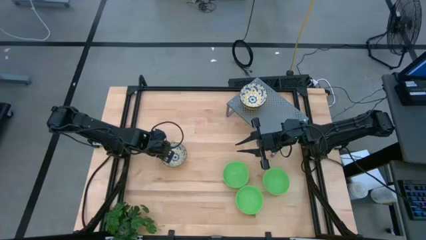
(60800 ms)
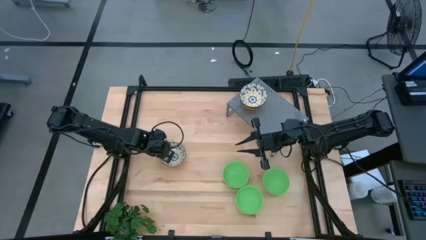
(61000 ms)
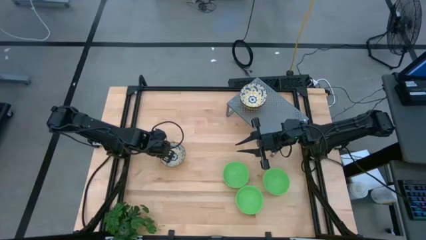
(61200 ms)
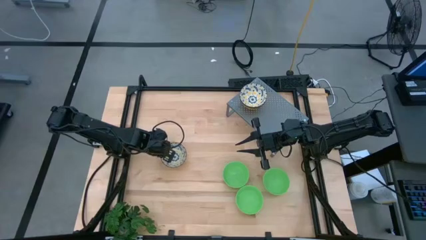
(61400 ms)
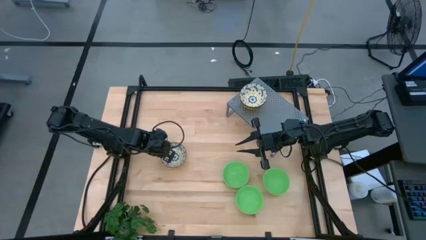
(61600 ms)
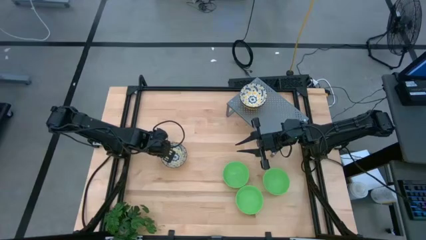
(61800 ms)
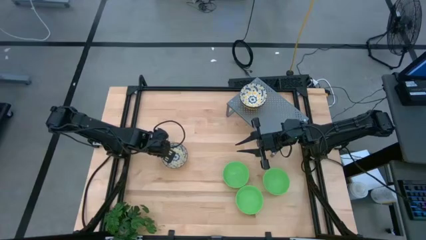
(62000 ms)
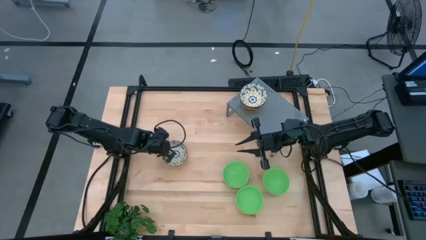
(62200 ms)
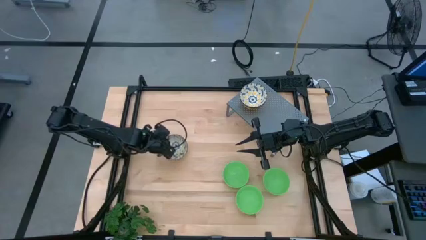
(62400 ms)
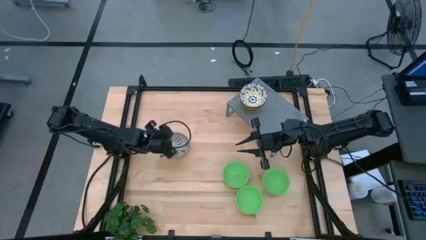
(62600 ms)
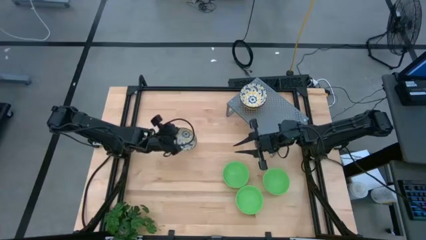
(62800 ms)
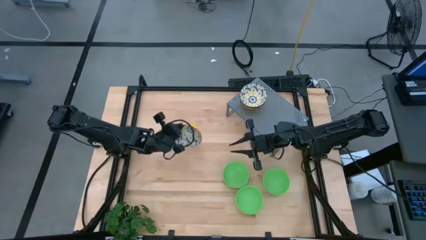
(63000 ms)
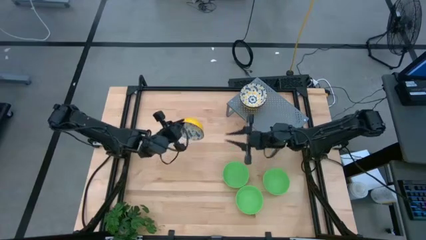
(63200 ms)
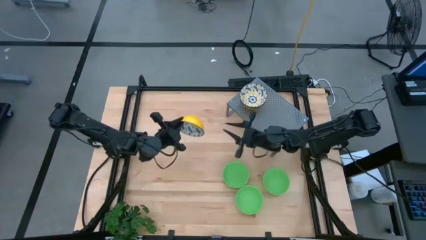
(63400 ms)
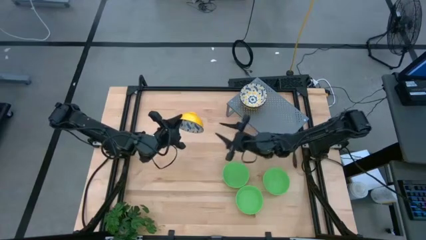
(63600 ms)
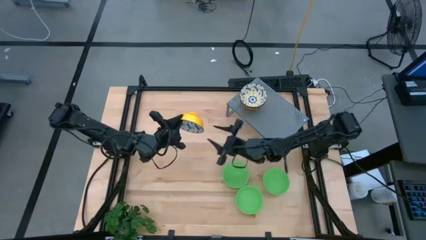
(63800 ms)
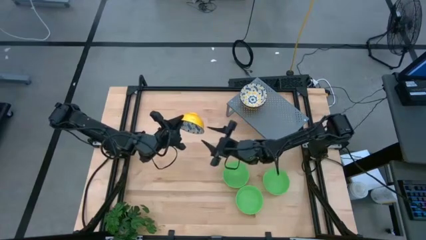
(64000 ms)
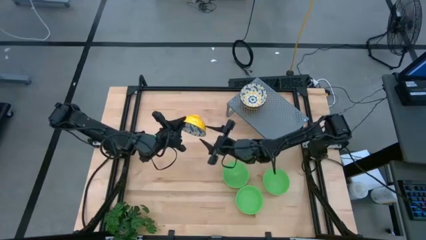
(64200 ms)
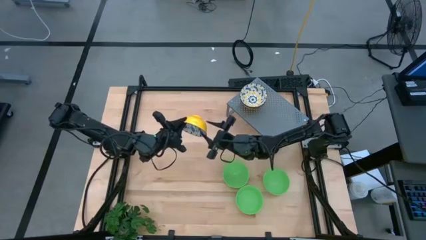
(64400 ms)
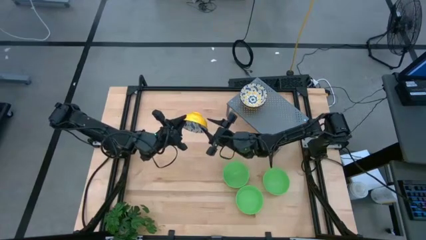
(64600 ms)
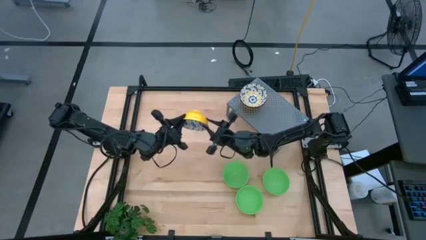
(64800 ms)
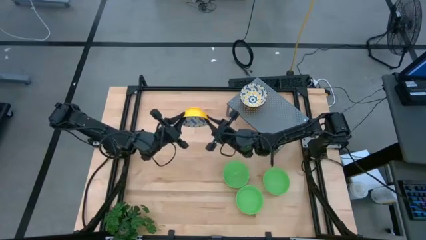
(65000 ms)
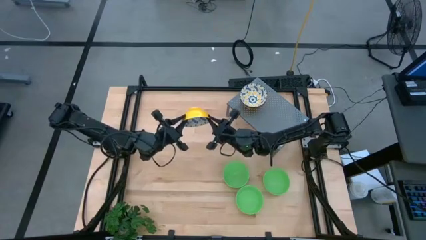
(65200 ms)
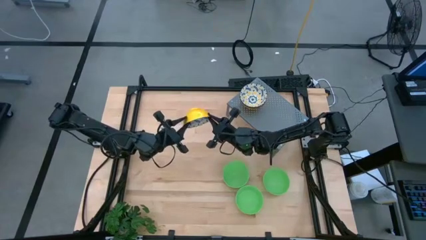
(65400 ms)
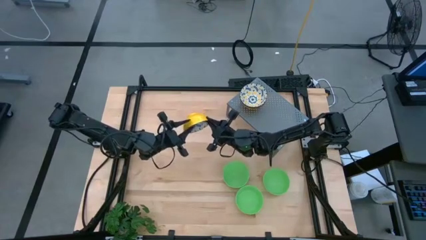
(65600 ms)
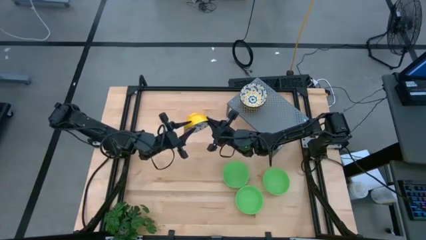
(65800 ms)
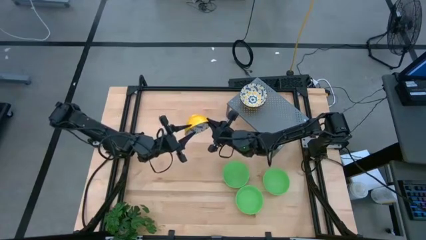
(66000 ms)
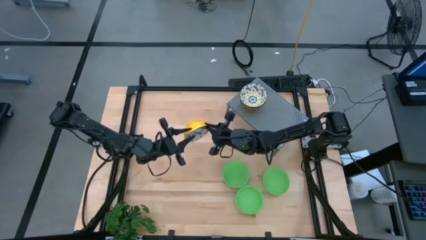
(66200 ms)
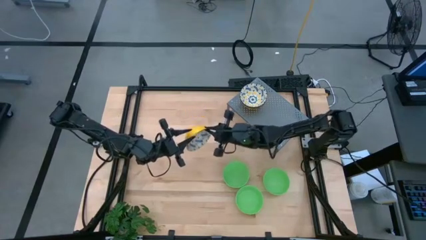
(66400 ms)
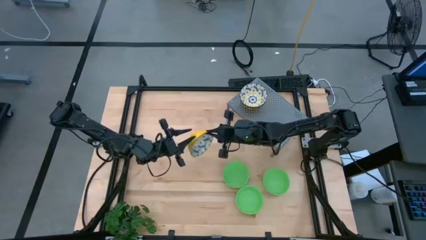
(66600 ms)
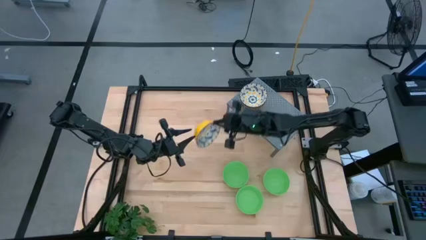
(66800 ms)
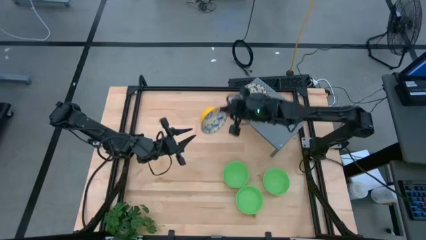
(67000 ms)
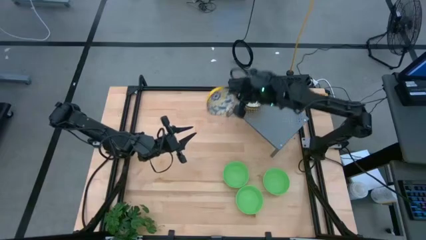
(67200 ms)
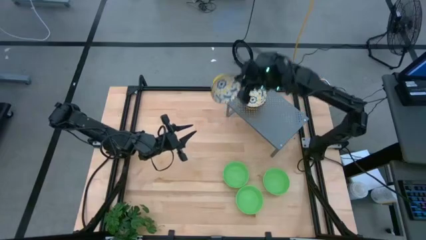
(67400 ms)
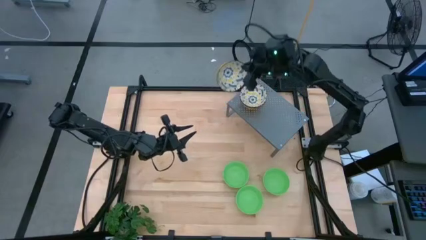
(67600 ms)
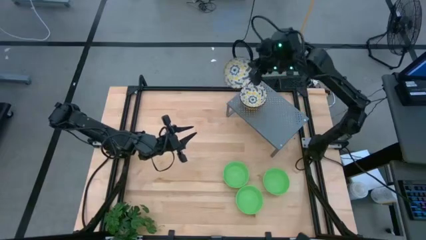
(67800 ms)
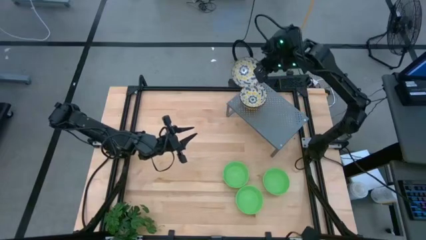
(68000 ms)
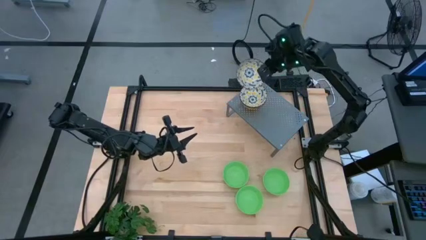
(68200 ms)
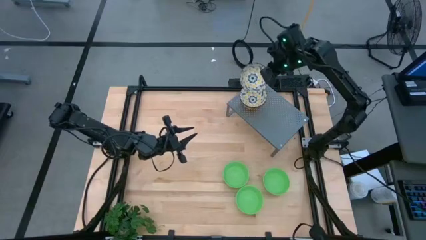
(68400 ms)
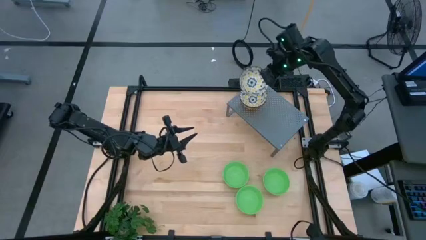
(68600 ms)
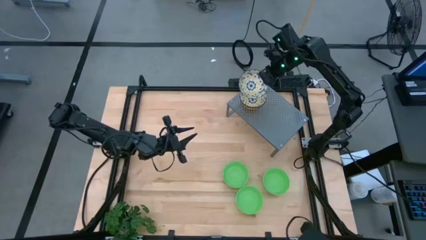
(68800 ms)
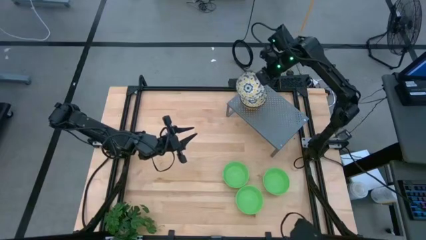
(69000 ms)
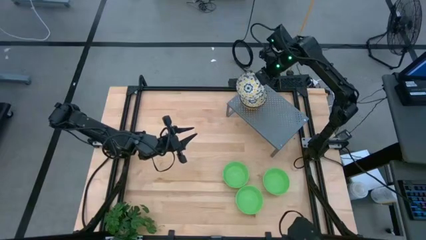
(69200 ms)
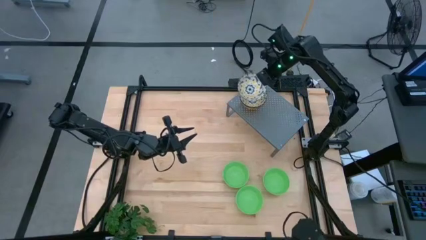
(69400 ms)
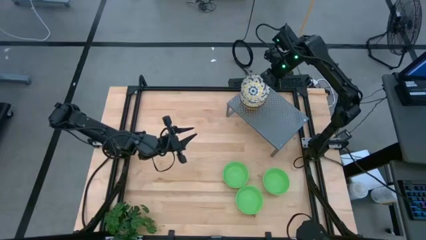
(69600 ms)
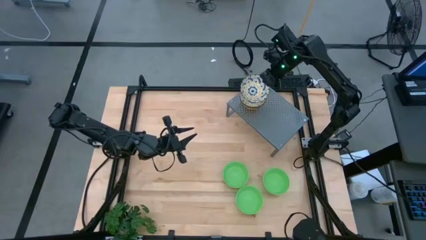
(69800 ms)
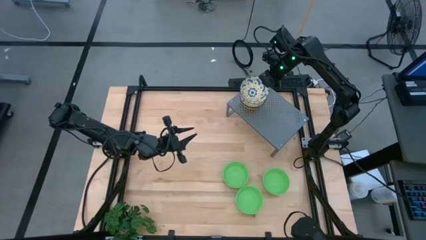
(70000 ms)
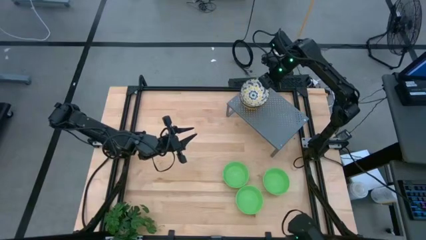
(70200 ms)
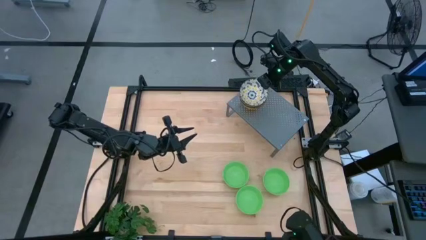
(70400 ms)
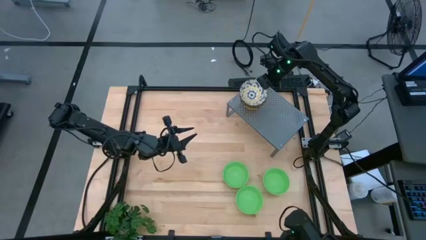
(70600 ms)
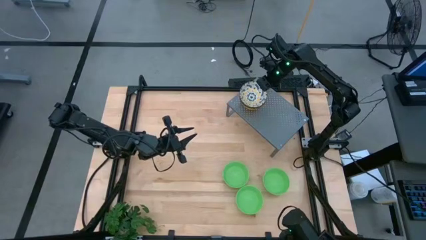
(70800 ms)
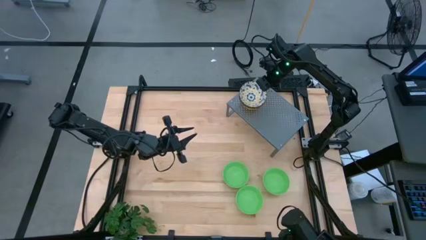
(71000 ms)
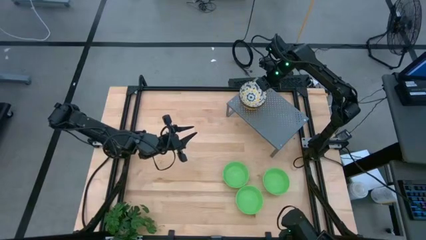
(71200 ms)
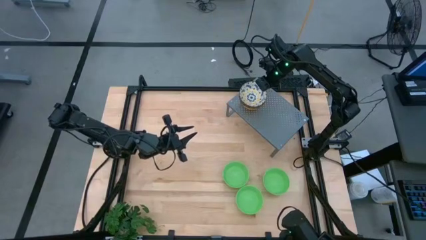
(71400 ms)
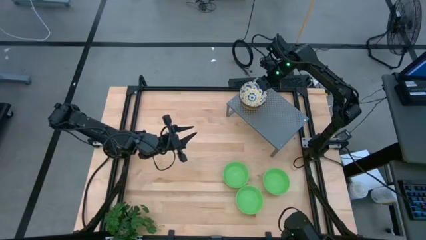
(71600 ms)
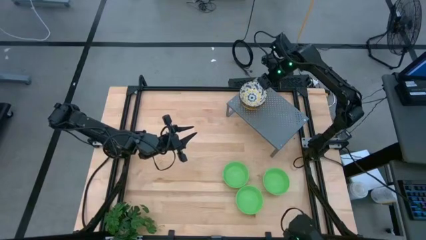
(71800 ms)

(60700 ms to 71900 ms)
Task: Pick & Place Mini bowls
Stack the yellow bowl on the stacked yellow bowl on the shelf

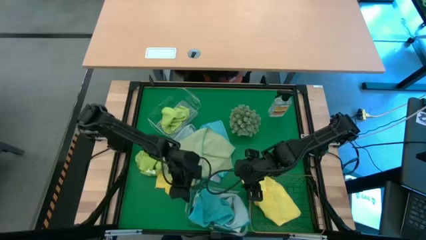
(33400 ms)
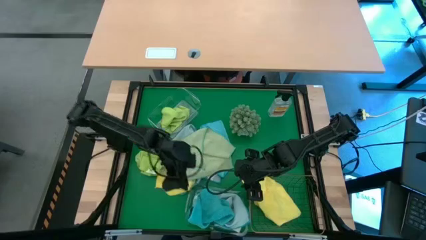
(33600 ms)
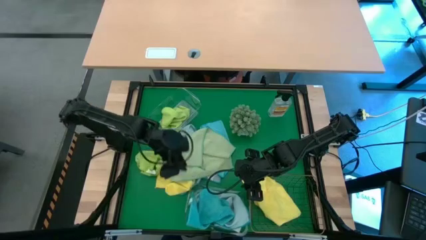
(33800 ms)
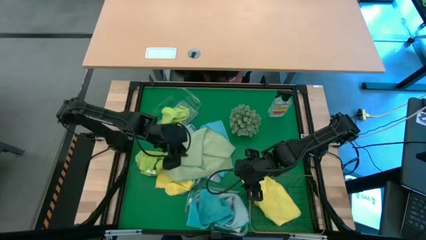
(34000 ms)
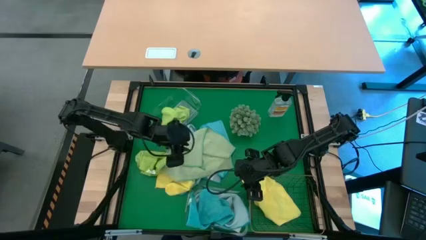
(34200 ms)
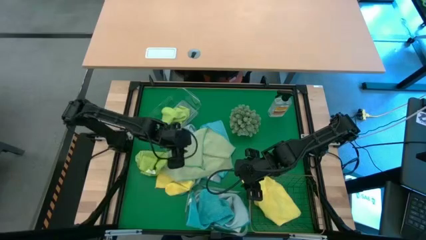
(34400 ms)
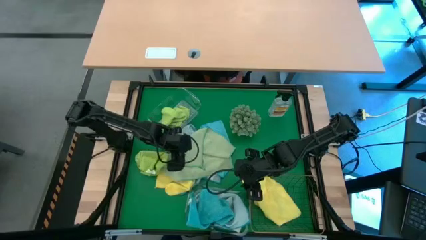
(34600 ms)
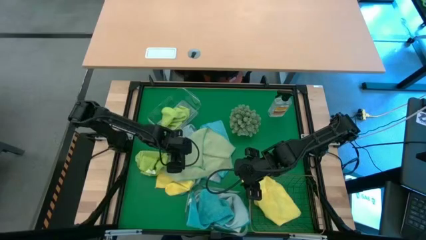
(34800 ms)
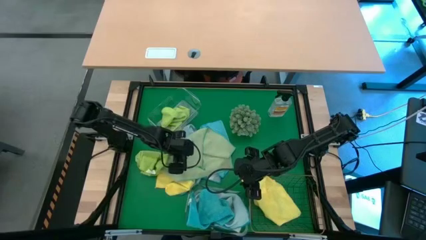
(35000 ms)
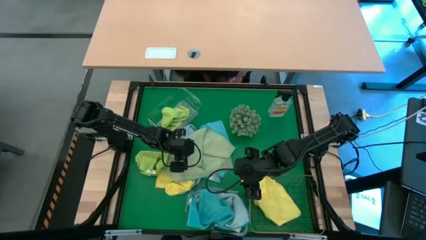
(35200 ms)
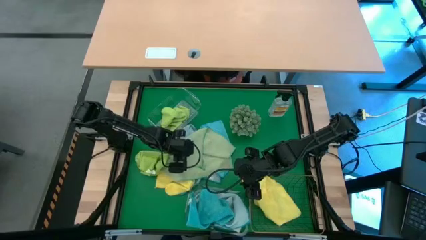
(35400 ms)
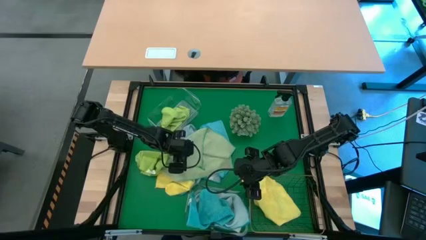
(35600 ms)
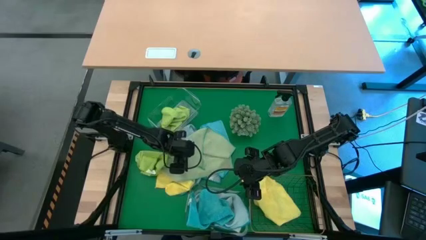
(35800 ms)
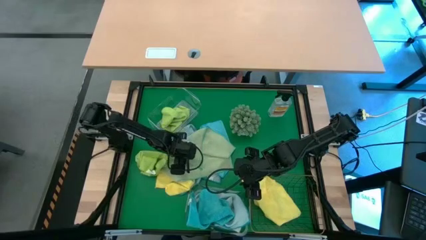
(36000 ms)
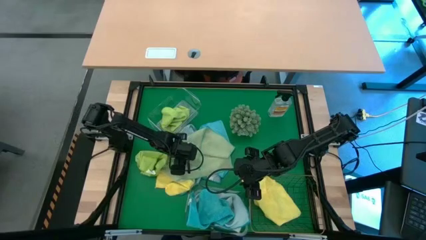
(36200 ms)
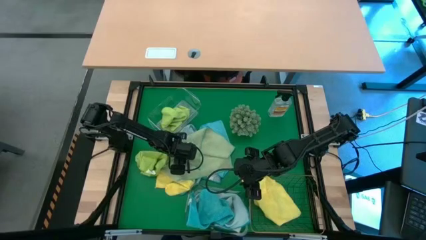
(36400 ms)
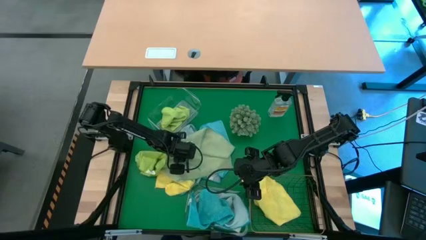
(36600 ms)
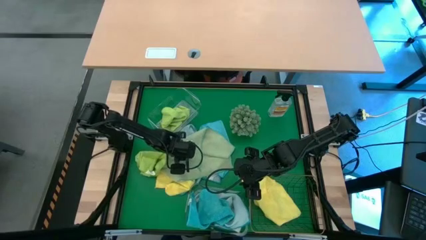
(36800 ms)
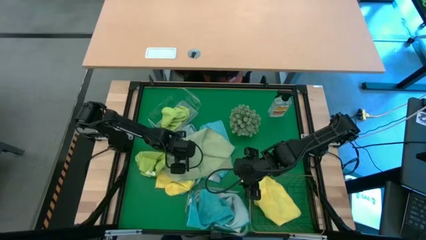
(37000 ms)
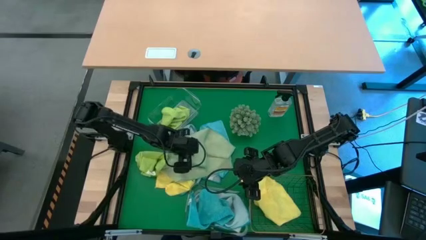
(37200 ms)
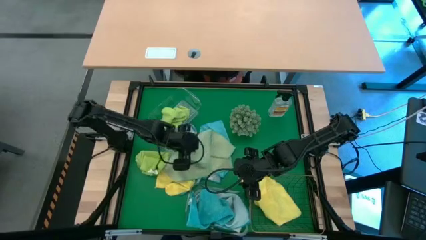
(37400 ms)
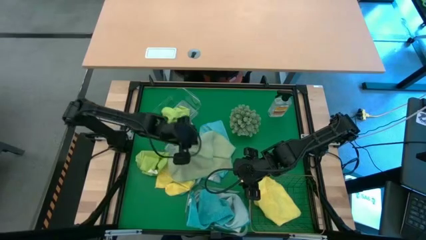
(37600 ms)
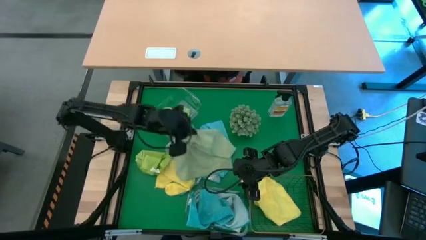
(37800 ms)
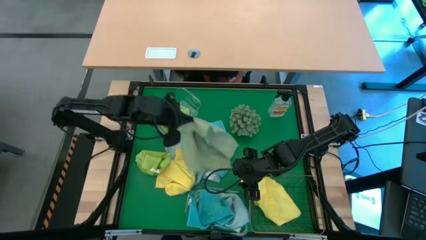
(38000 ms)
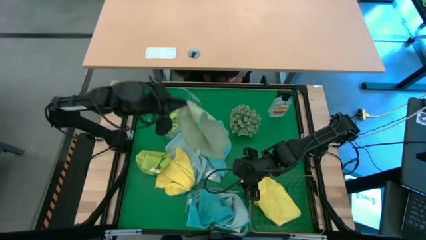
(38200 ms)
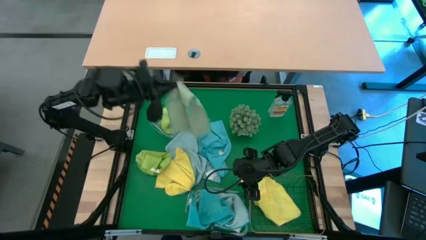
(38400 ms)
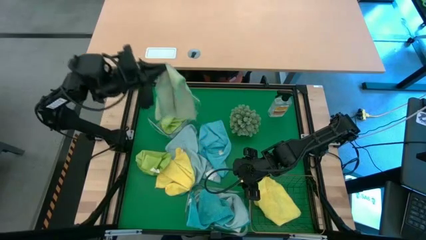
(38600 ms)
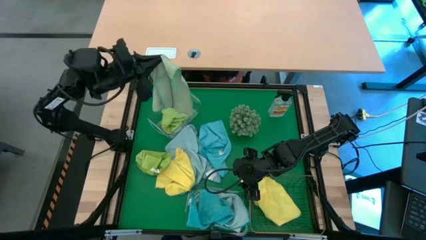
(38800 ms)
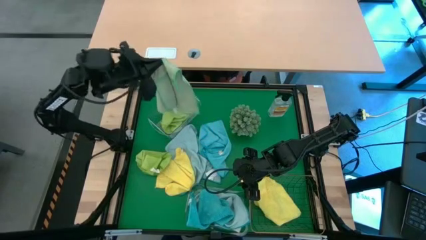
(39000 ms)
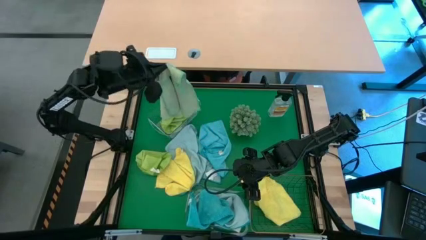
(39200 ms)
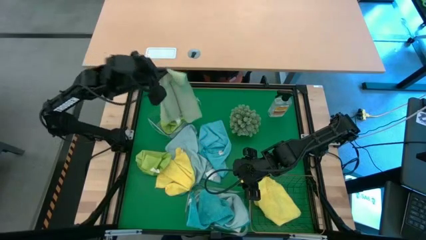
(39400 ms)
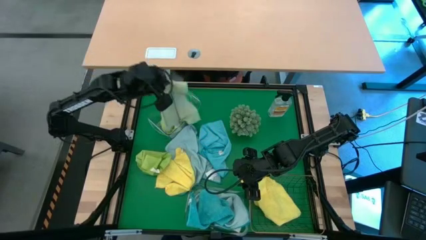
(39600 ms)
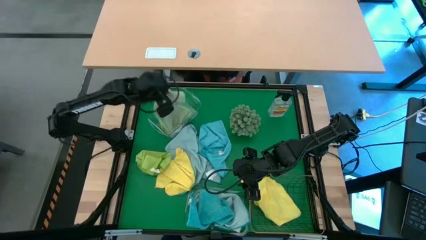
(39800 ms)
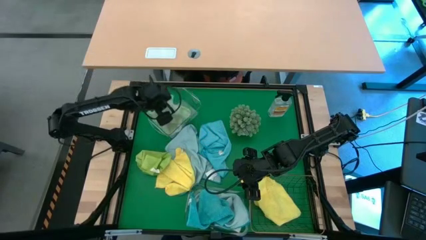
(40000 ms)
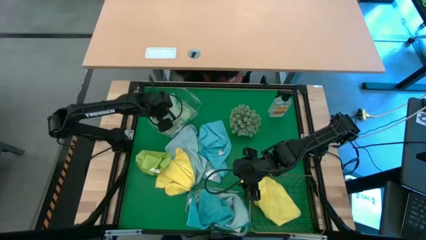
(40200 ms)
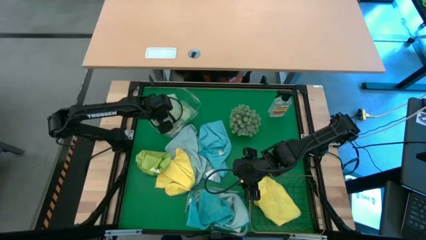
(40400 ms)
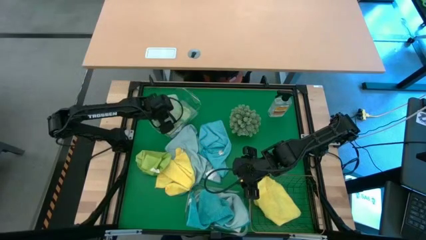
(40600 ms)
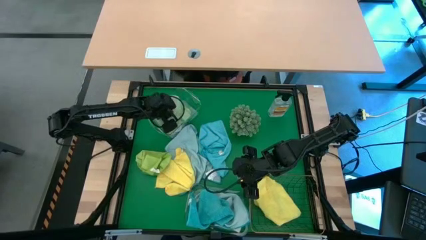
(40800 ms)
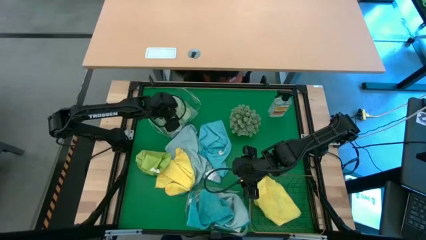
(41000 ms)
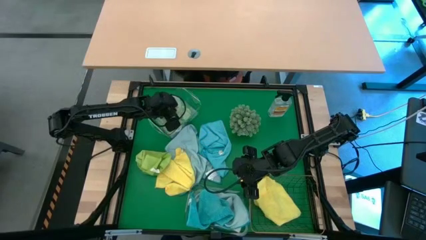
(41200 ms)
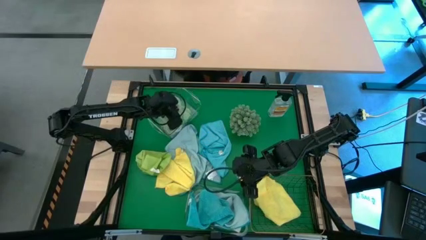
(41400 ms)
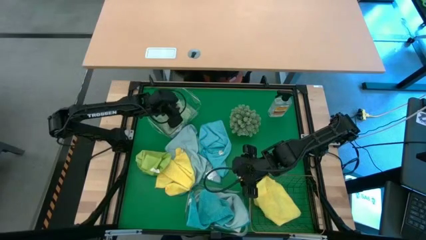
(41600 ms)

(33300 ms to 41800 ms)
Task: Sort microfiber towel by color & place in baskets
Put the light green microfiber cloth into the top transparent bin
